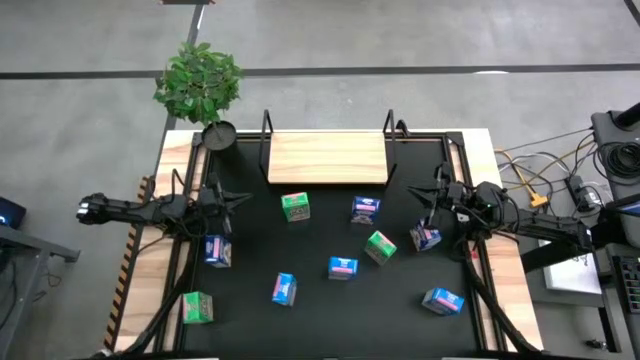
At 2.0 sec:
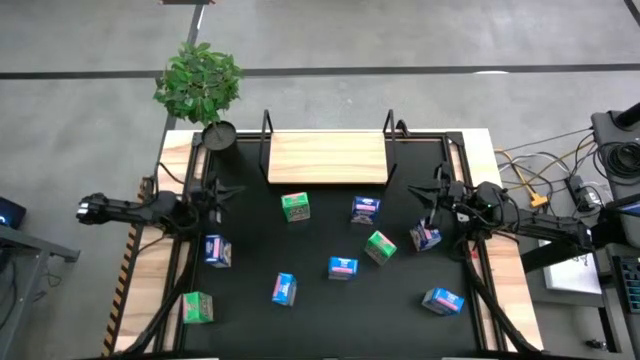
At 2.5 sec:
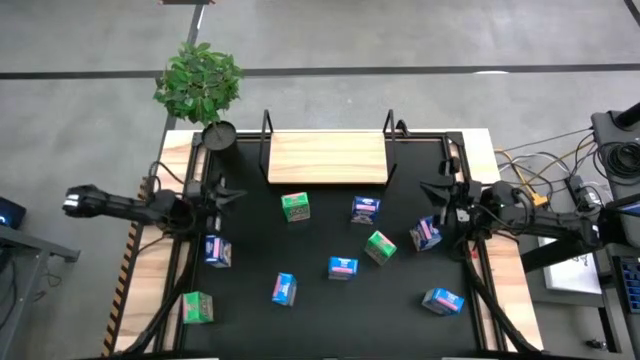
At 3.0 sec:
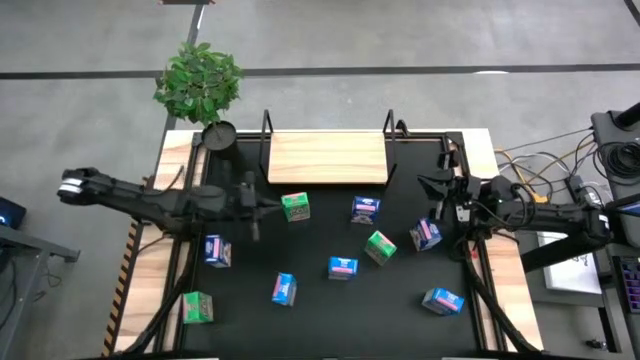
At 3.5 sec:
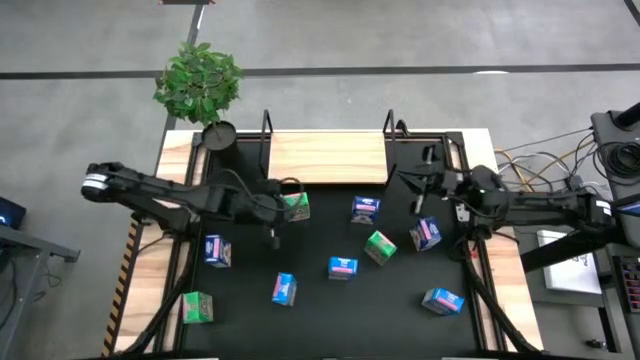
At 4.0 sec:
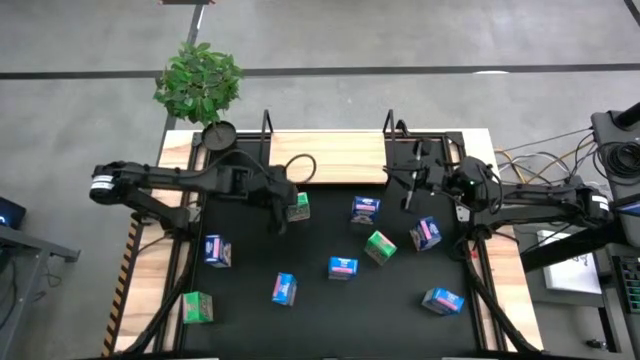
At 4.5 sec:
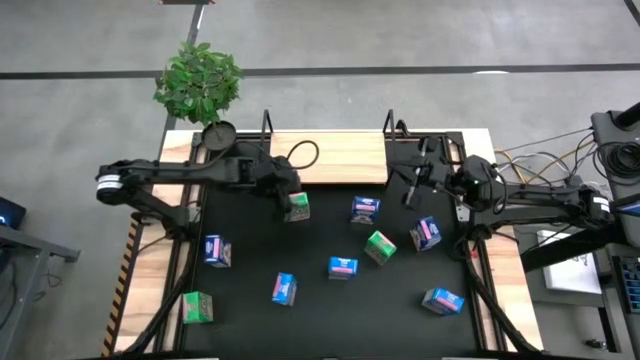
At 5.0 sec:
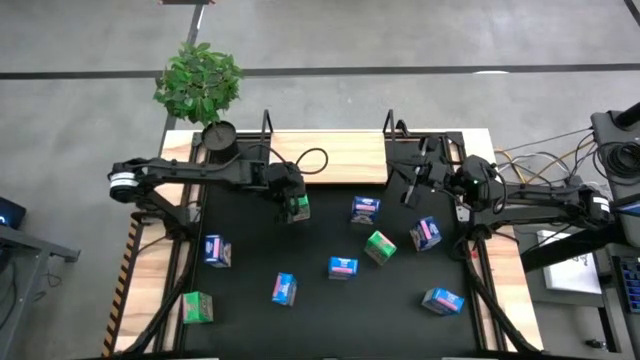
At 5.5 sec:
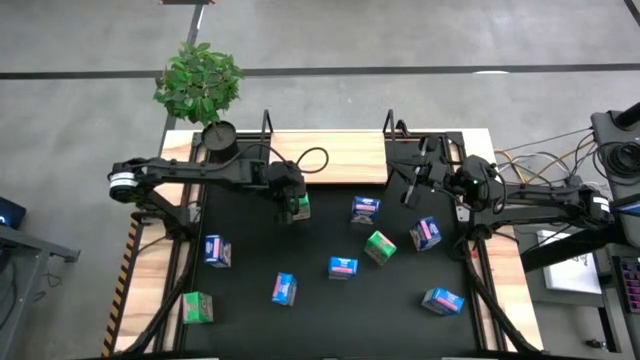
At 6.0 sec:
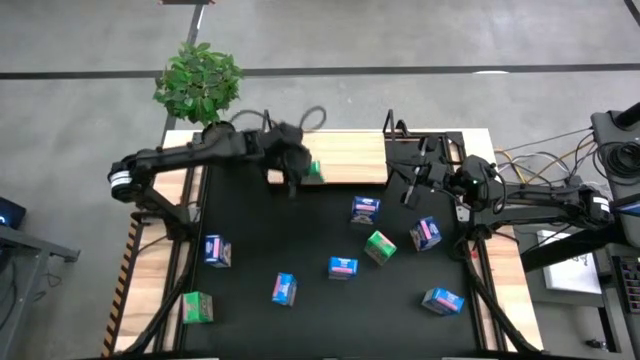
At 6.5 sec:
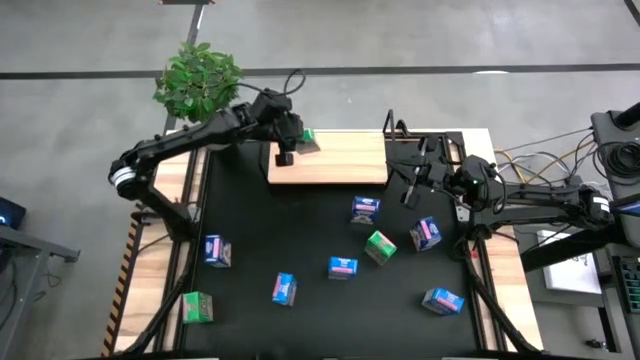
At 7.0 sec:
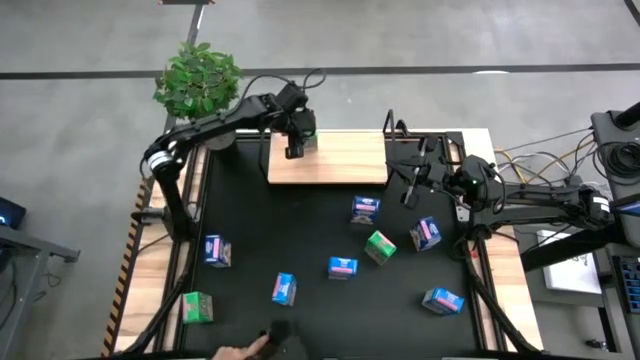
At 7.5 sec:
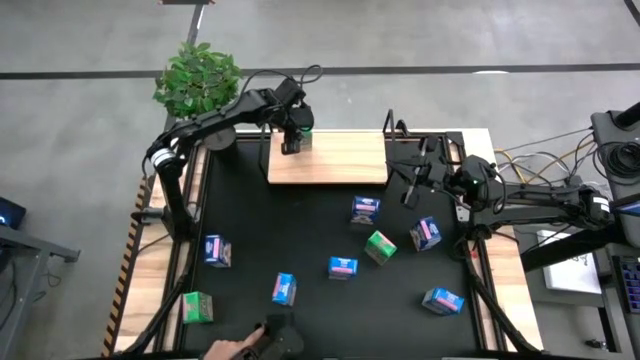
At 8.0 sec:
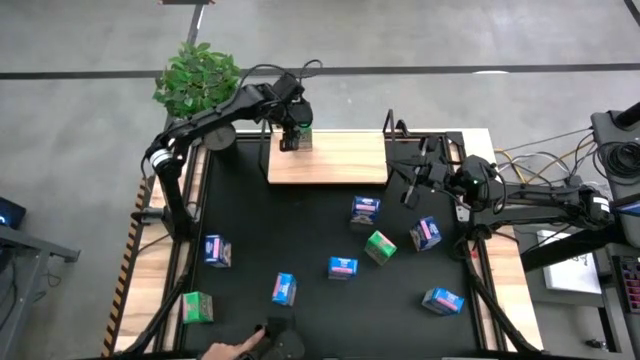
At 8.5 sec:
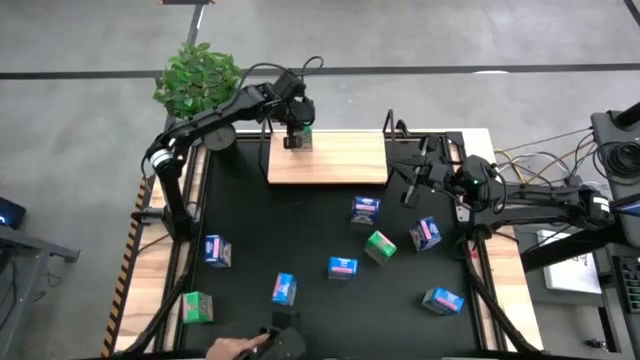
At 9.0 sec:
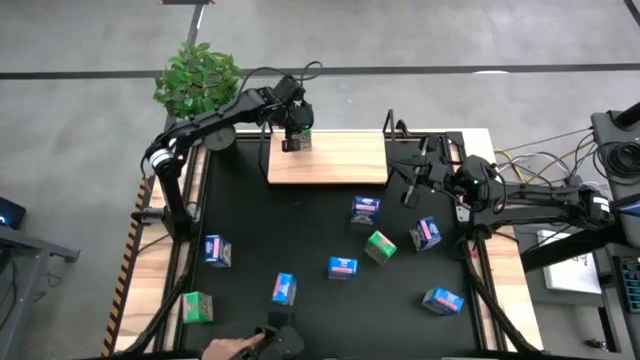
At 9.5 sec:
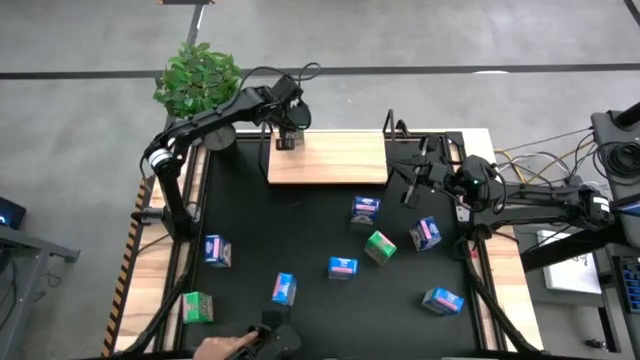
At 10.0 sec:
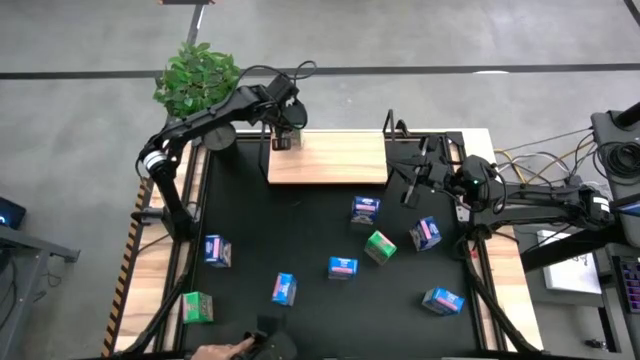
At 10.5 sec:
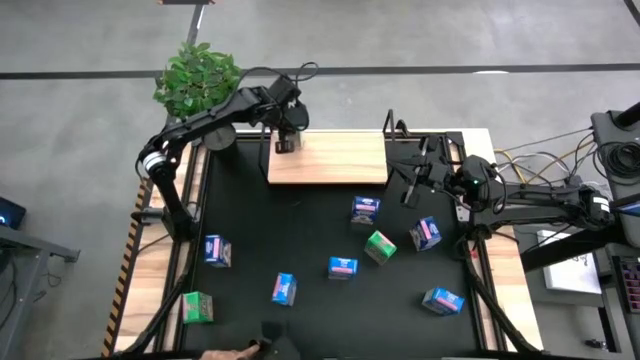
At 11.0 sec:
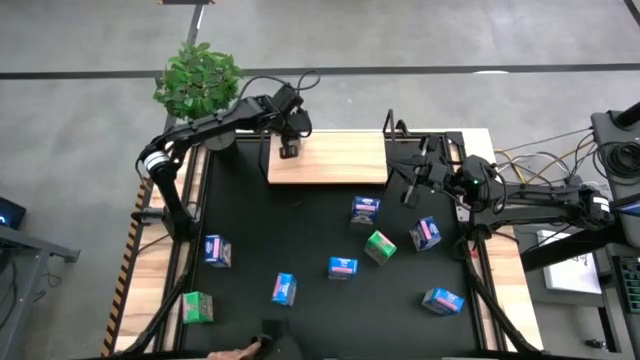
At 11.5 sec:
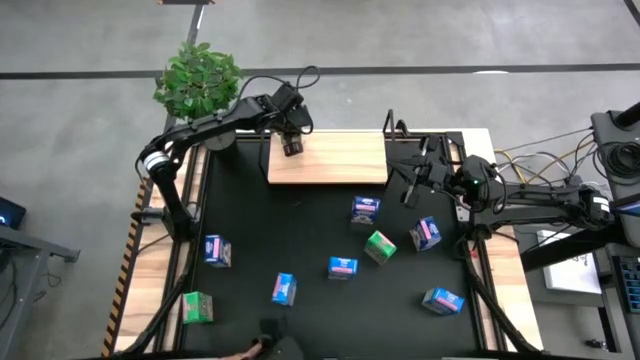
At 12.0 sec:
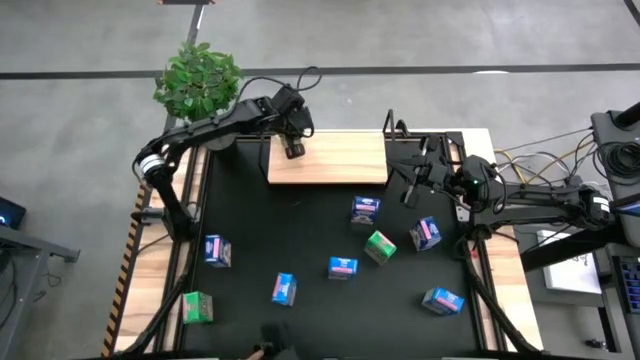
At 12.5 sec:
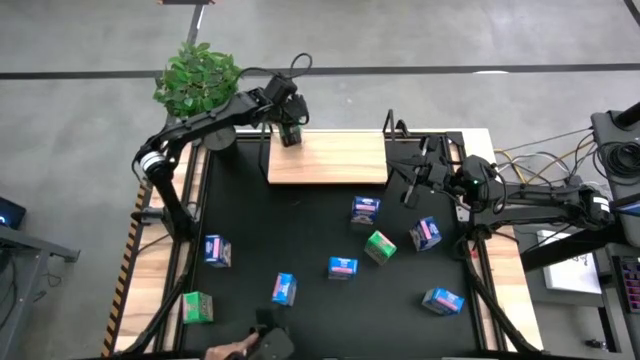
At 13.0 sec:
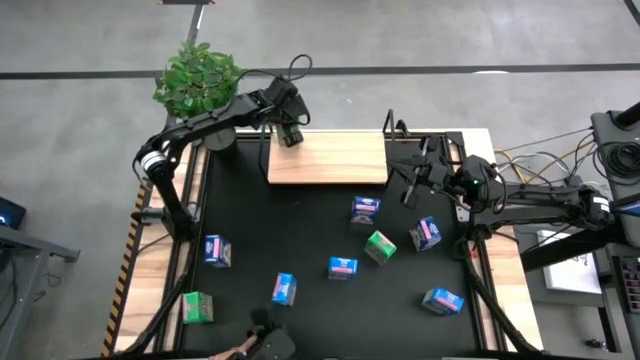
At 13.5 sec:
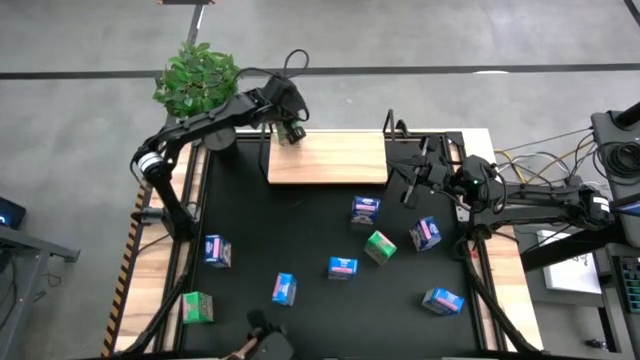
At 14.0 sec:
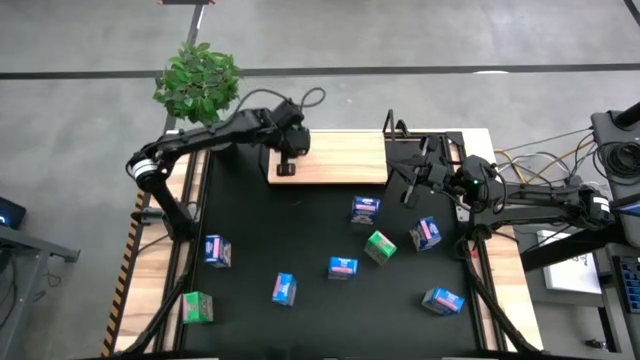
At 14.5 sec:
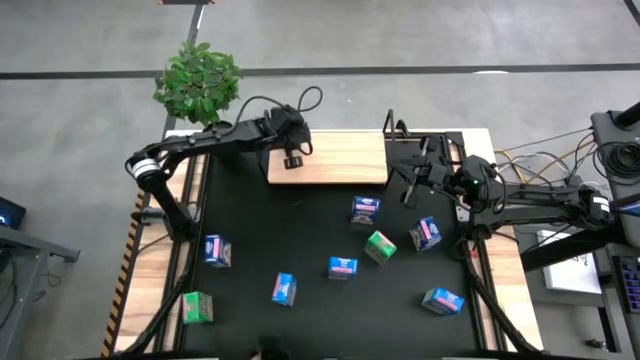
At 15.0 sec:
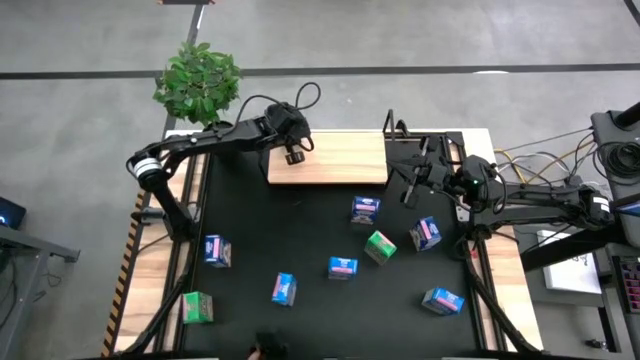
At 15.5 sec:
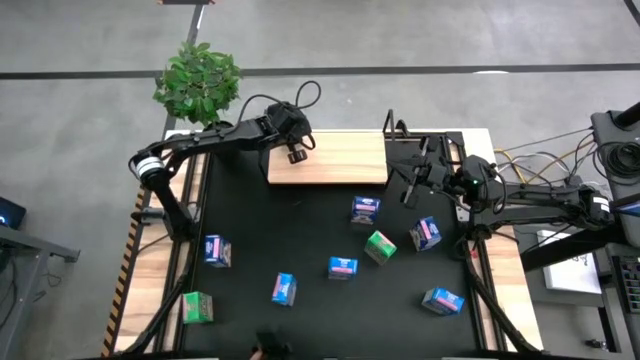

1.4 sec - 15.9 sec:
Task: Stack cereal on shelf
Put the top green cereal box on the shelf

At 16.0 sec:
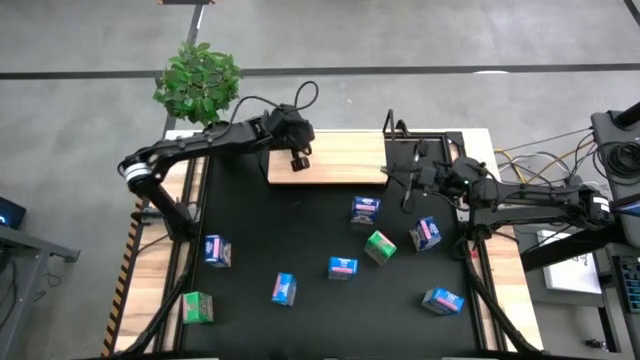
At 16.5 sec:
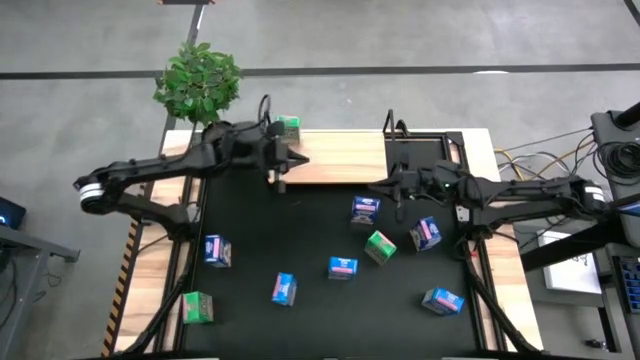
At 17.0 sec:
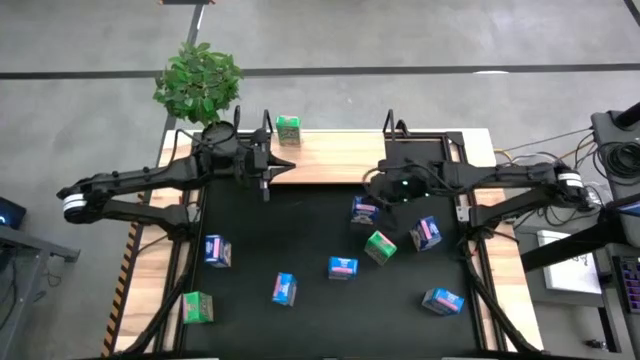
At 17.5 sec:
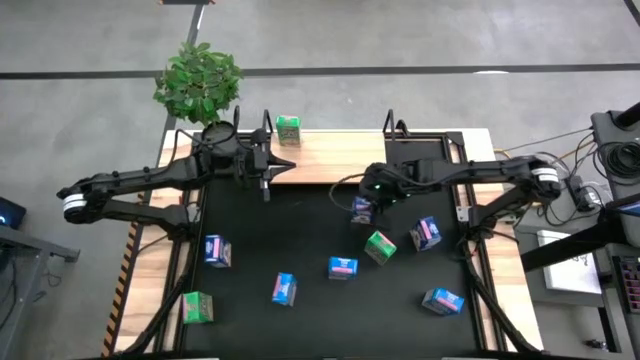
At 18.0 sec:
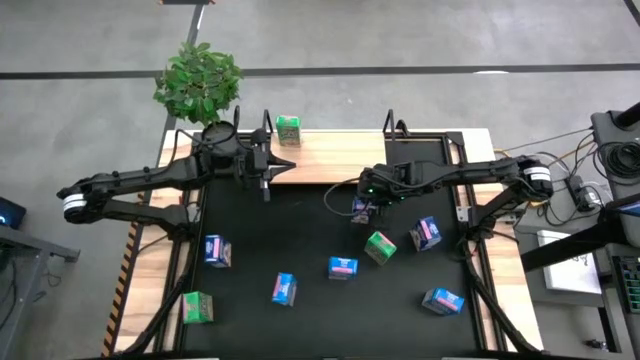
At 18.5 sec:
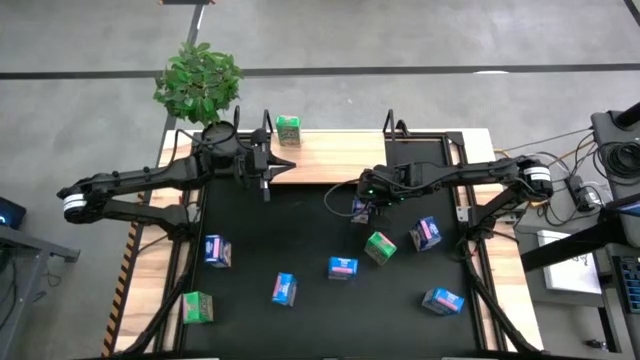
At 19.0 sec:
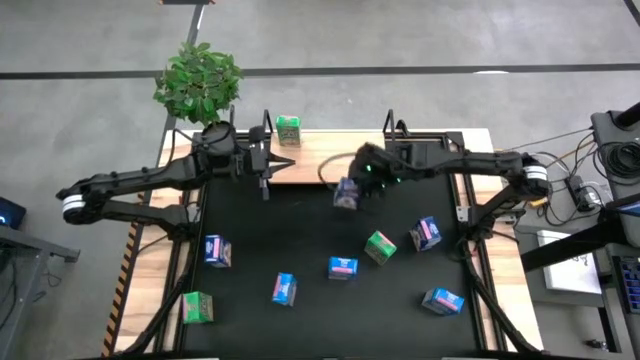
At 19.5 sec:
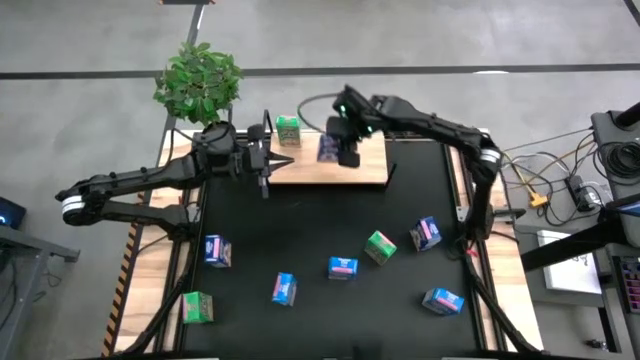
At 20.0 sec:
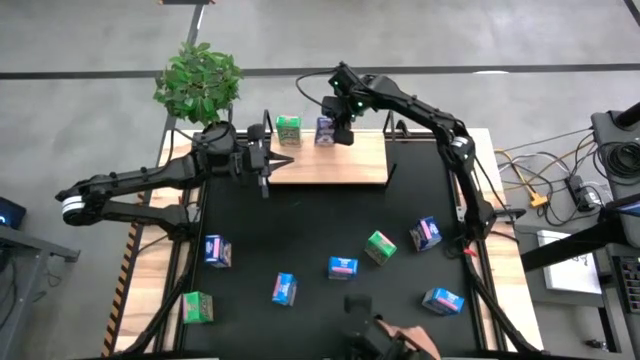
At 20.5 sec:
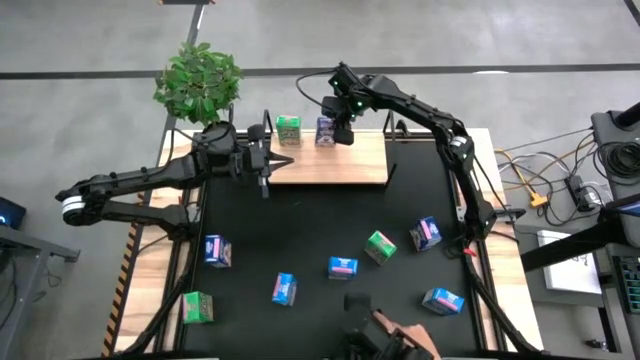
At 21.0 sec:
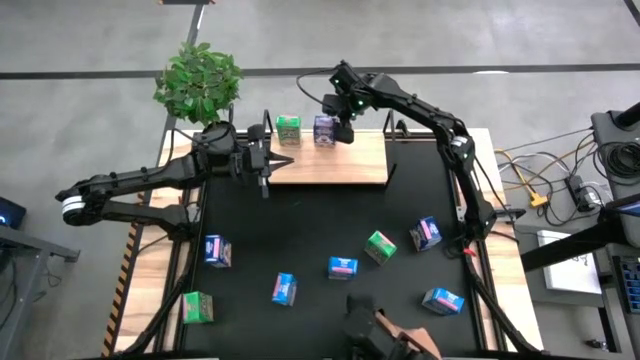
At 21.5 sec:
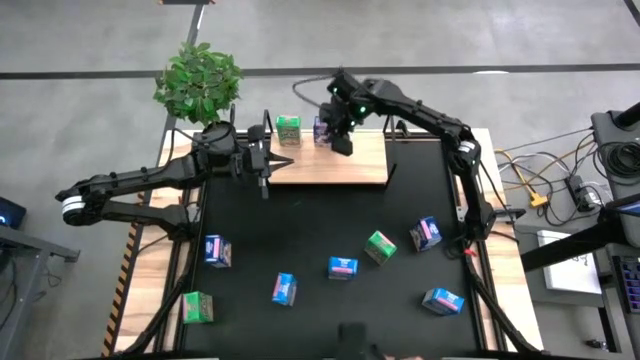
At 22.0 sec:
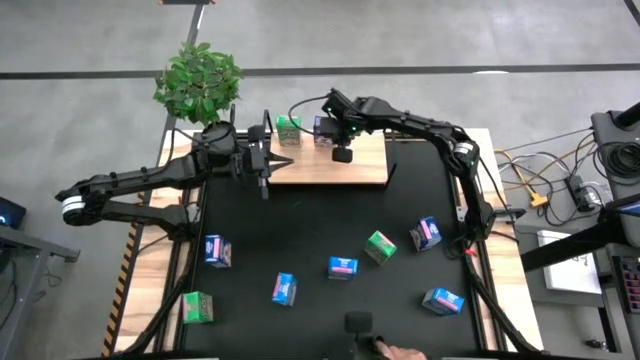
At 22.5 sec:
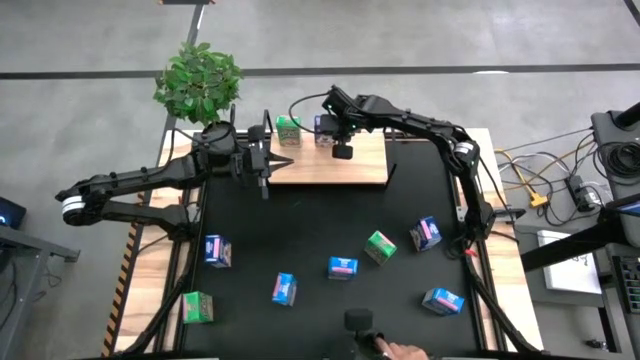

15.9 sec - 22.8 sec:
Put the top blue cereal box on the shelf
